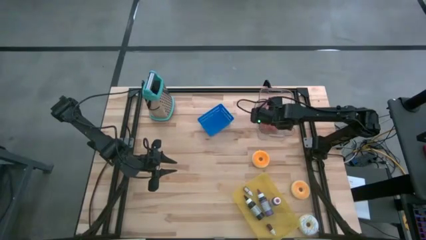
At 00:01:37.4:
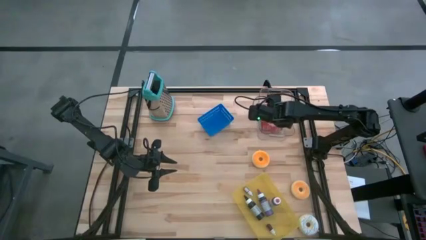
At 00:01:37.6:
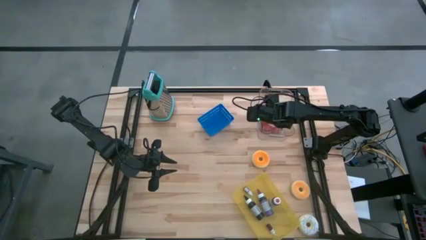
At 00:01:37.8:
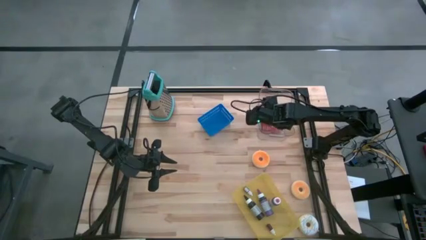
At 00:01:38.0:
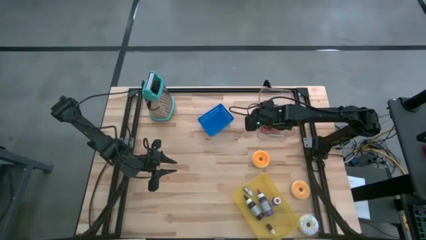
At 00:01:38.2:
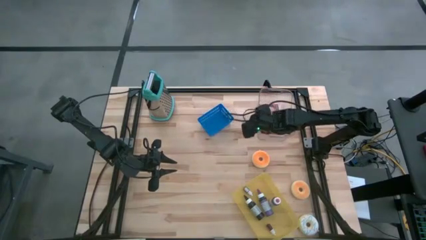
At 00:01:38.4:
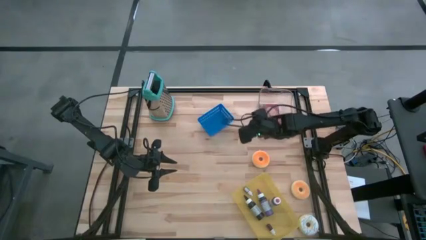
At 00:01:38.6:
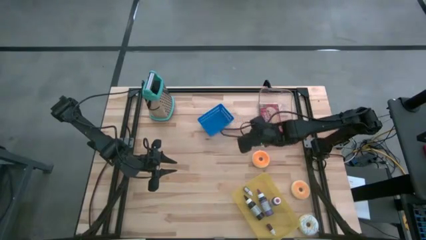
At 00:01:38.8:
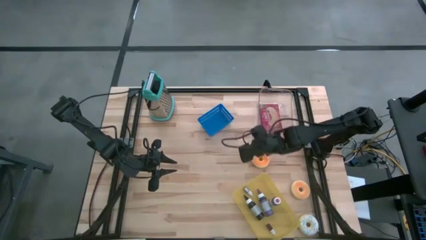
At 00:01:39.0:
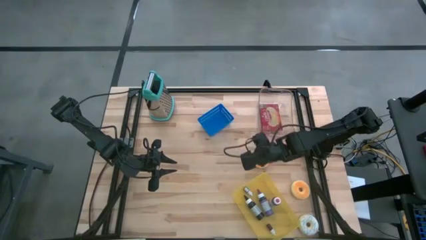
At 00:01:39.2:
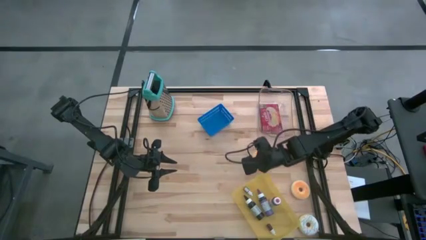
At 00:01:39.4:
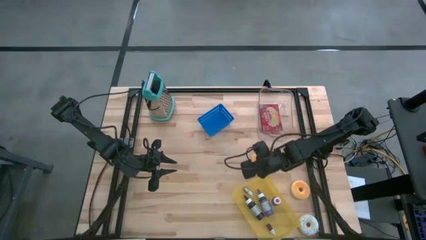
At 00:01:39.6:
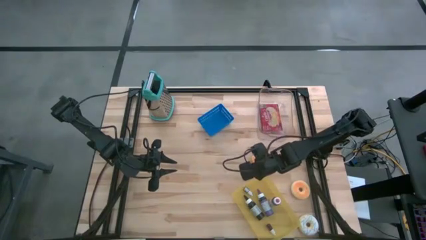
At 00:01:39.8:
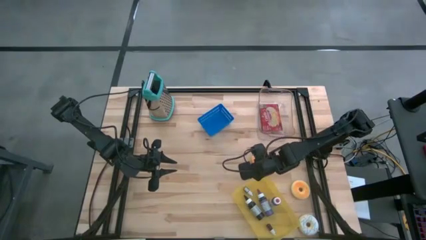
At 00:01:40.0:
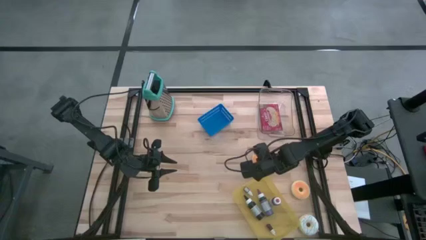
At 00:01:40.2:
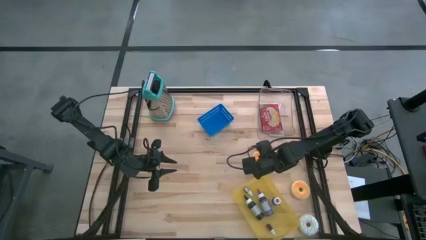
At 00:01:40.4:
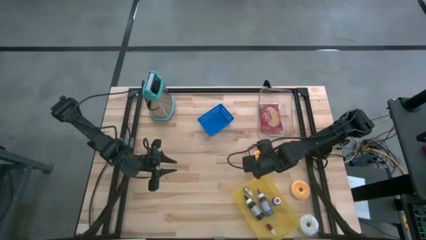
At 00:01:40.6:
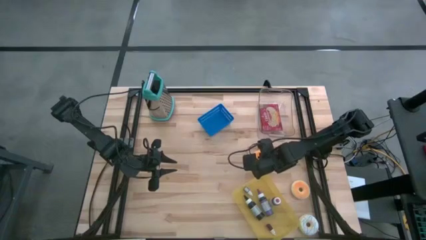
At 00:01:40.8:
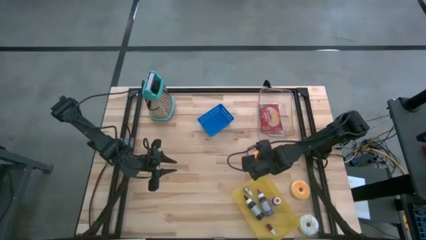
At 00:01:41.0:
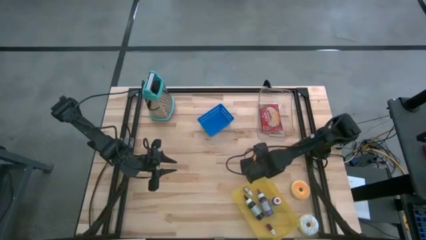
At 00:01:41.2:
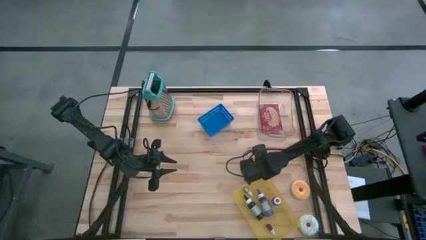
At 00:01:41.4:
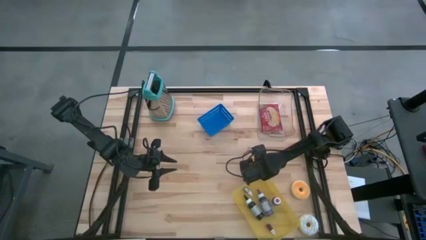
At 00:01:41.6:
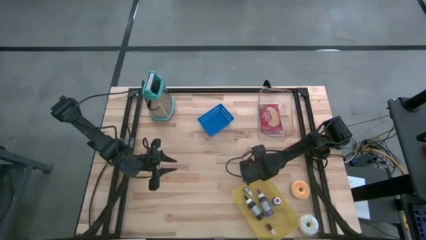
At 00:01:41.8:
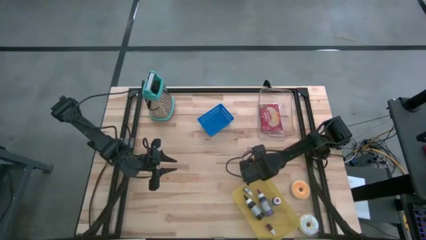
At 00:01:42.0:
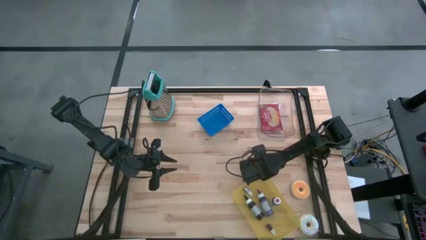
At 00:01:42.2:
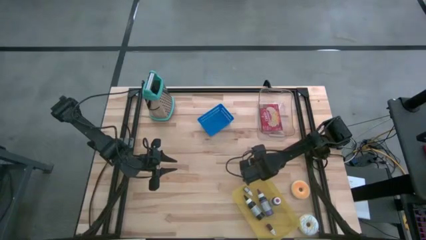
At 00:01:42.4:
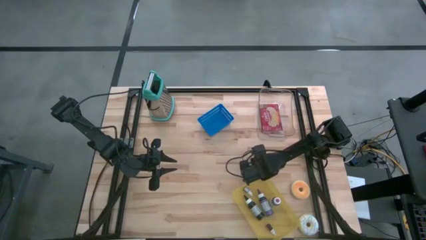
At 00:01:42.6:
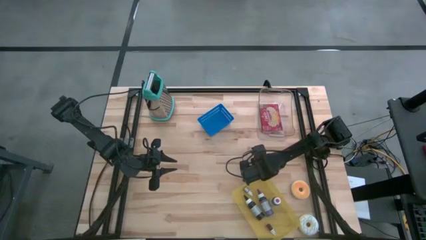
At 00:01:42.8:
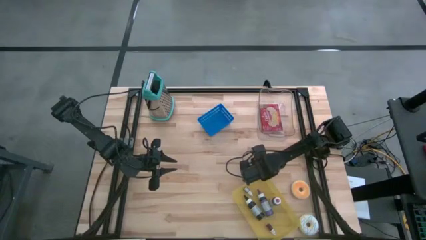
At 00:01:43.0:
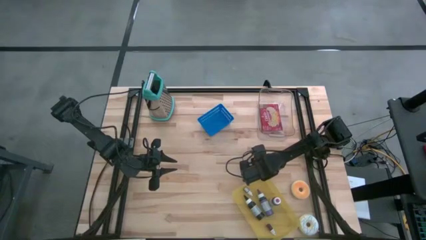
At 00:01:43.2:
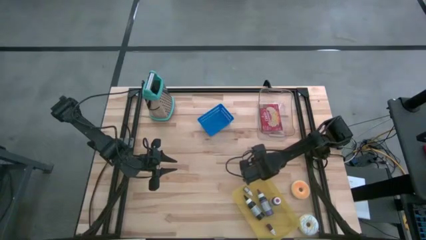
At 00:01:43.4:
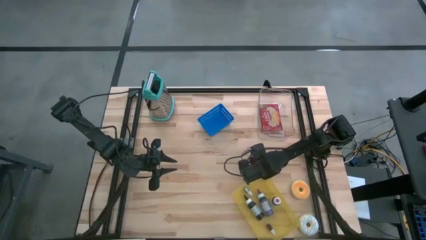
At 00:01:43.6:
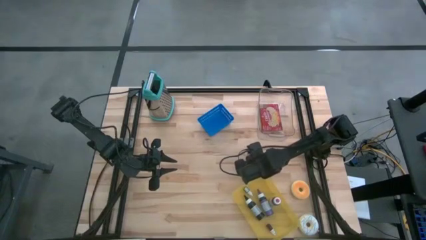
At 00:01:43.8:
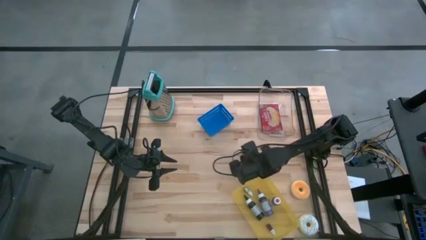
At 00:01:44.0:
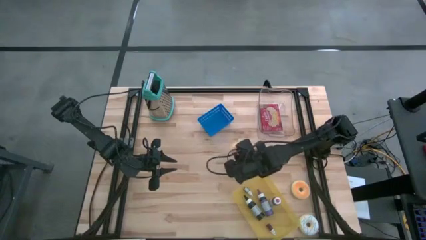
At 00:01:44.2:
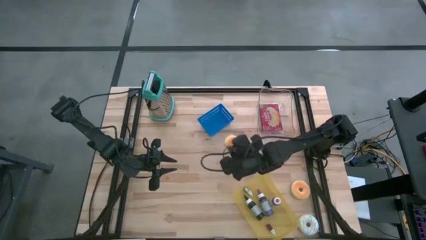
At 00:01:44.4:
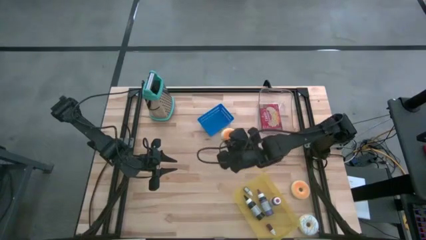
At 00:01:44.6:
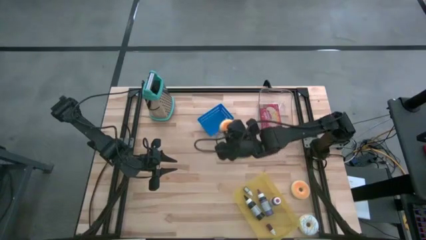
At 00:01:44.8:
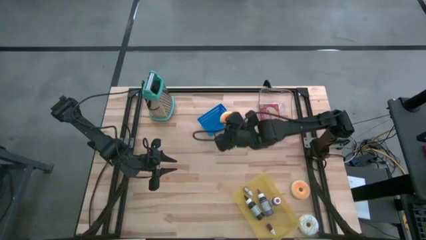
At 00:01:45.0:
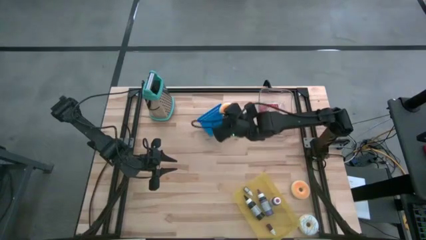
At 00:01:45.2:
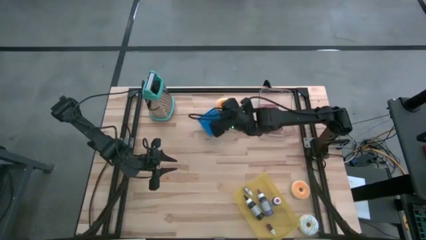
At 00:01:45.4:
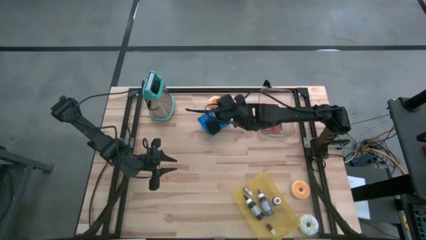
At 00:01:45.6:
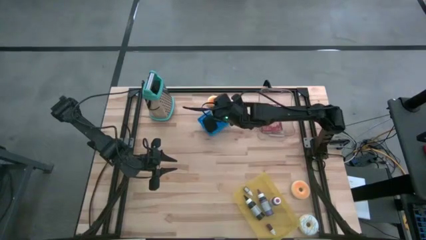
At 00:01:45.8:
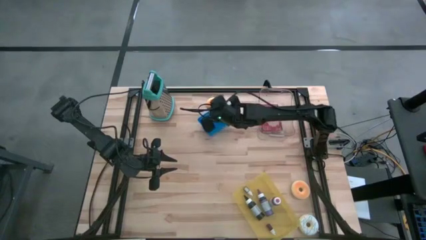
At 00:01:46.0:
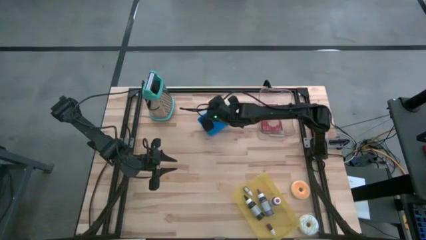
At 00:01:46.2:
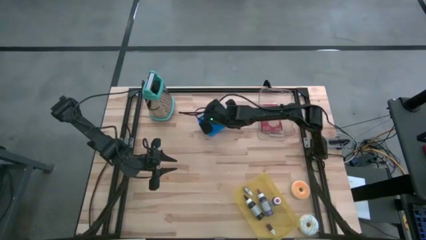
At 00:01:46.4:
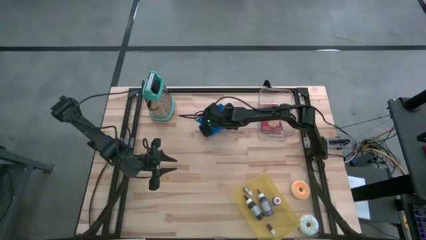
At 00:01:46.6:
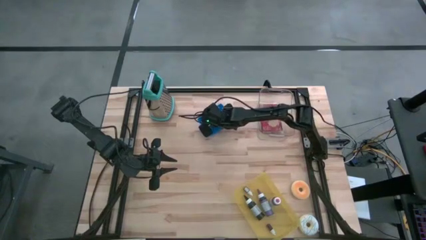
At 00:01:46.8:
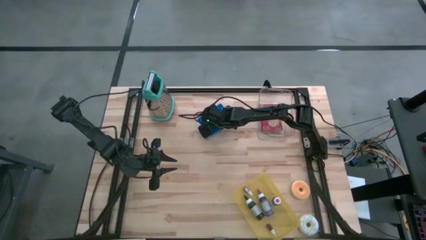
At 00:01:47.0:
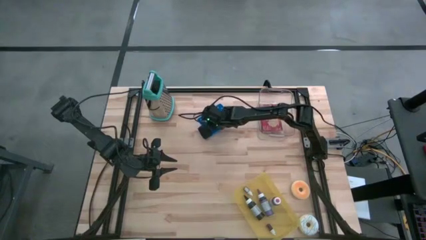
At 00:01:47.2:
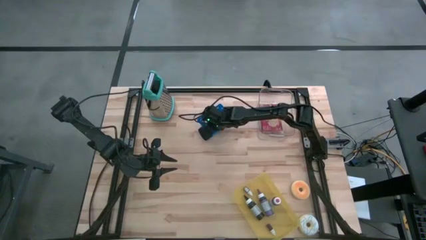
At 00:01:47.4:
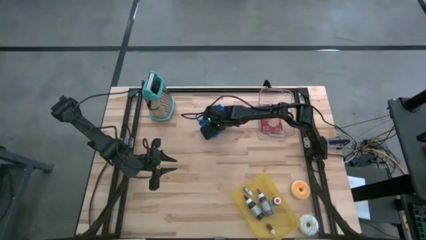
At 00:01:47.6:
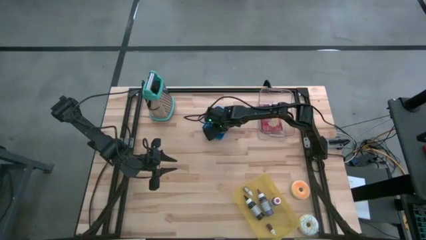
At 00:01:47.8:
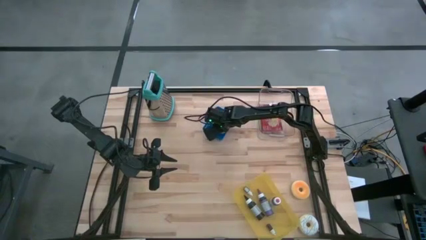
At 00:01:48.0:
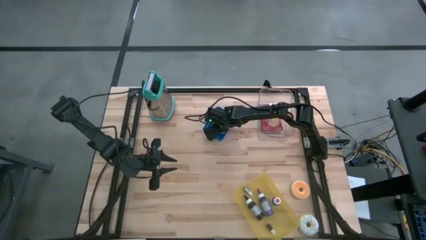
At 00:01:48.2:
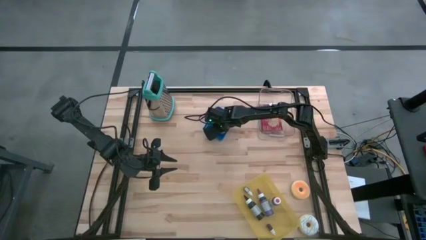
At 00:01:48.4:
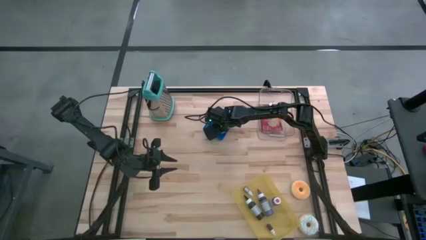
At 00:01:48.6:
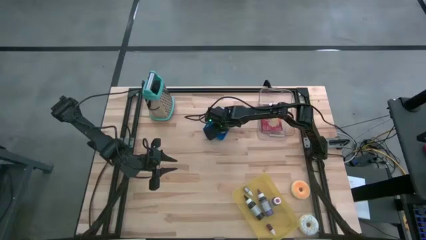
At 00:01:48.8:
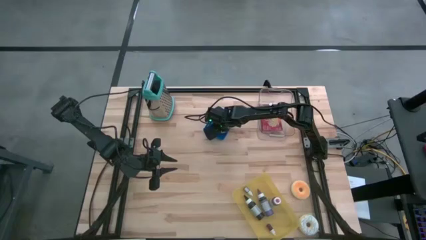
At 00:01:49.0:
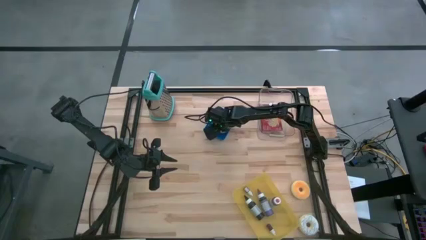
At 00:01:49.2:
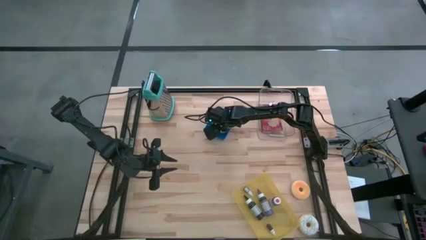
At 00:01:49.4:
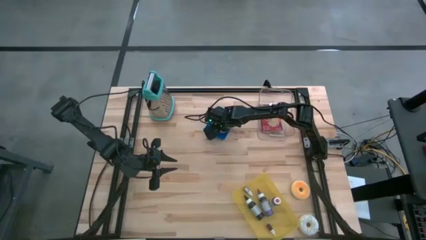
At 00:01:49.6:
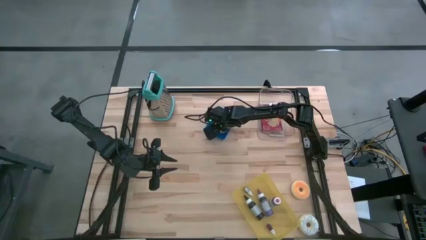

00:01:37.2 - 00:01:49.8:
Task: Pick & Place Food Item
Put the top left orange donut into the blue bin

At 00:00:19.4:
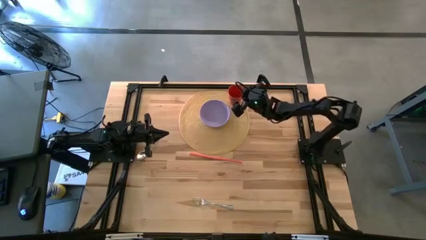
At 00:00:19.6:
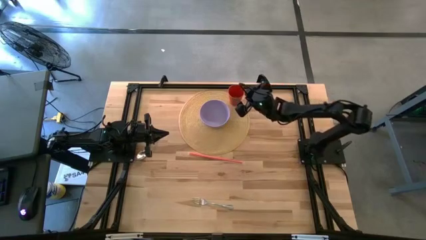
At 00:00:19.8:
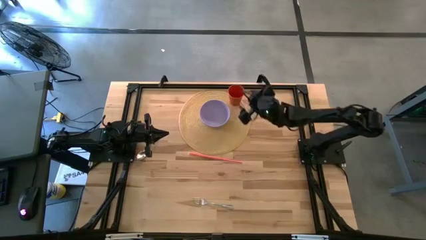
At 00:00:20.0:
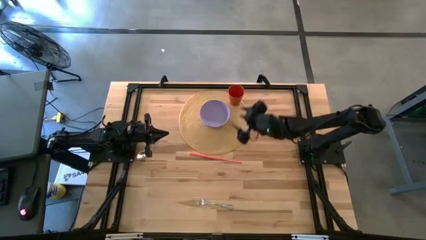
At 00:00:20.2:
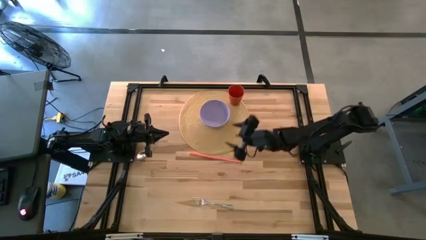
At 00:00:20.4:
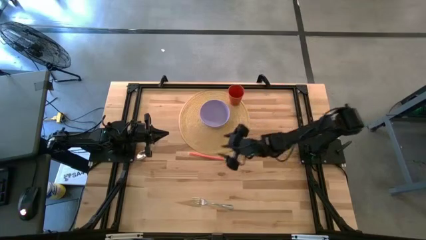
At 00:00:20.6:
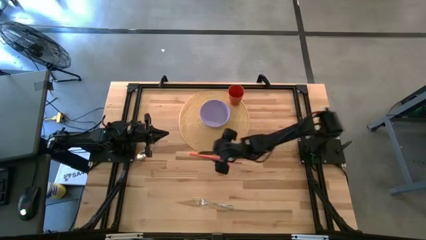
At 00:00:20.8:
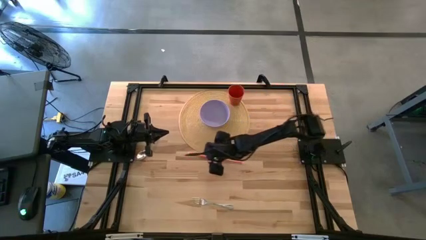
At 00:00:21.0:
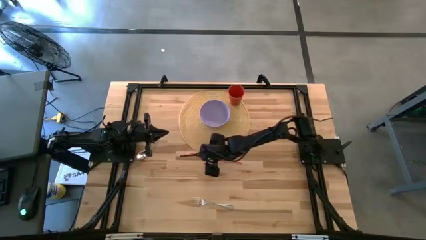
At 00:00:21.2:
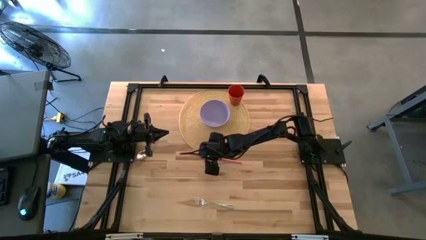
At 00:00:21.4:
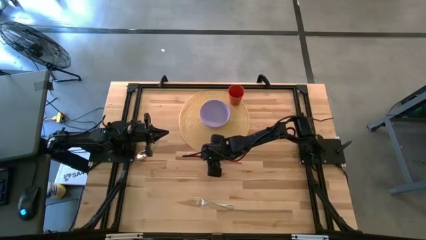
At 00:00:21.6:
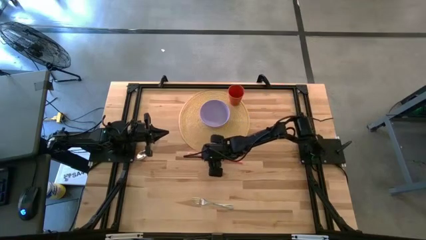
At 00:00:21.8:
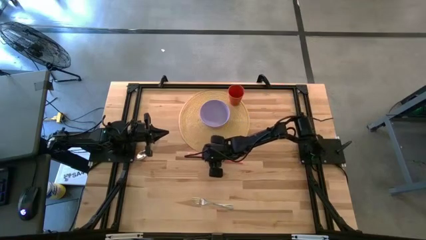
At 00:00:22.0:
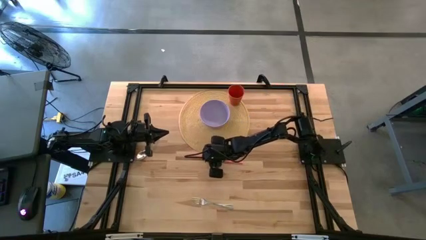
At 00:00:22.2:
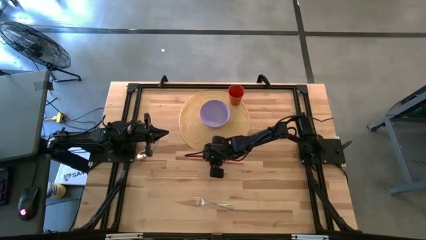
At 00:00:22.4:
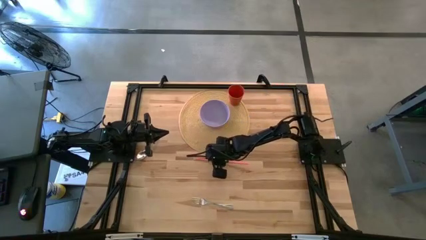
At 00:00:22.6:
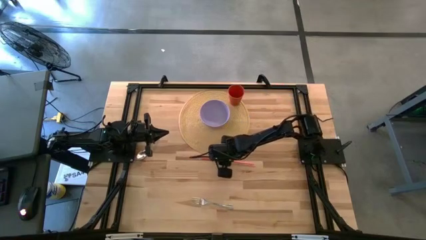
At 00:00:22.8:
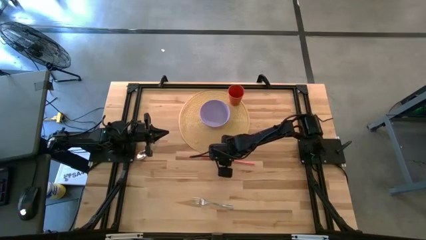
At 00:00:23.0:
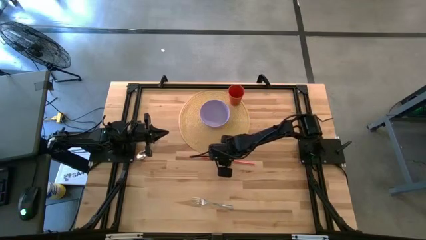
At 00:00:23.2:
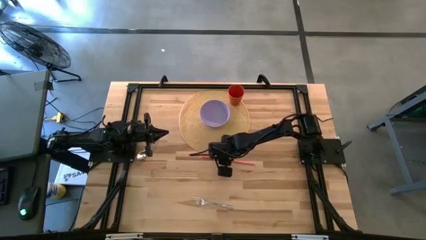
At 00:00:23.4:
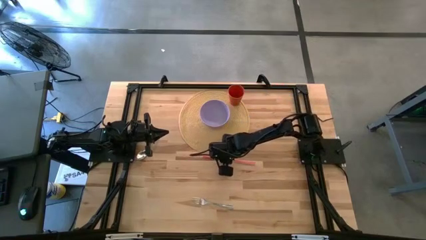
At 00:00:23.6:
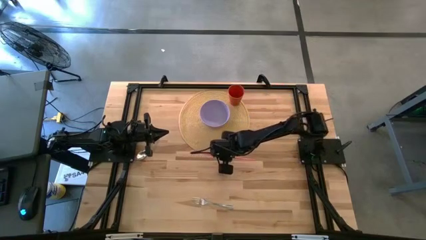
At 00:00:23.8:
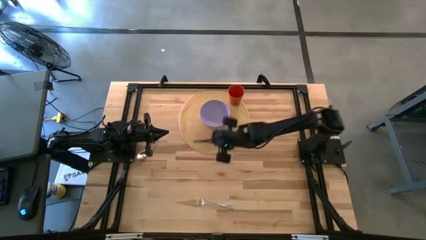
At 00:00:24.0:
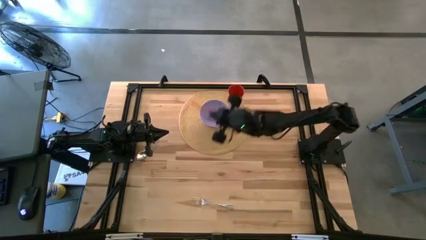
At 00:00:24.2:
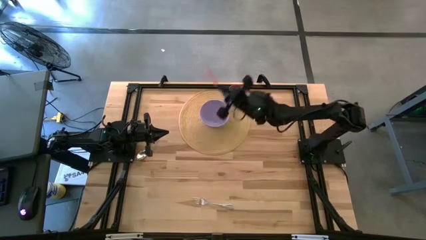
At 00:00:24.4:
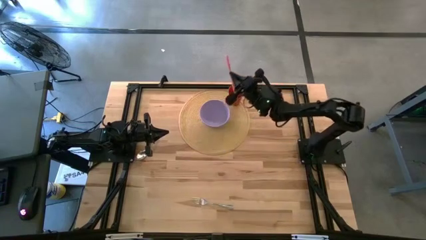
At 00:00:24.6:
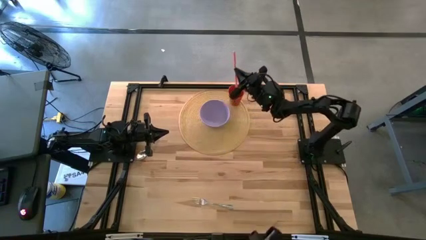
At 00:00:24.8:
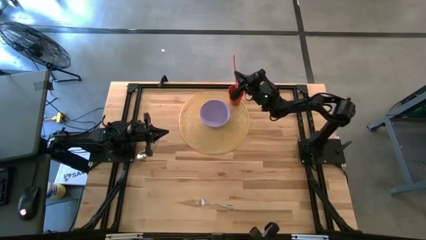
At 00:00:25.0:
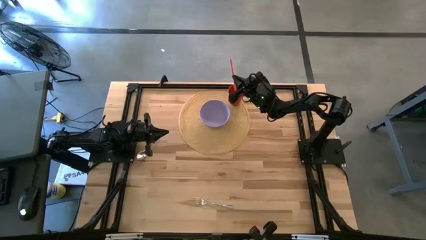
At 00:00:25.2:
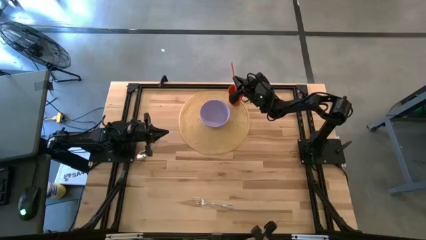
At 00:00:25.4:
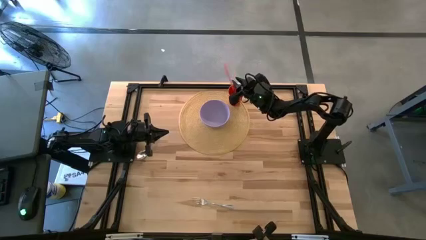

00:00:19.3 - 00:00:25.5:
Task: Pick & Place Utensil
Put the pink straw into the orange cup
